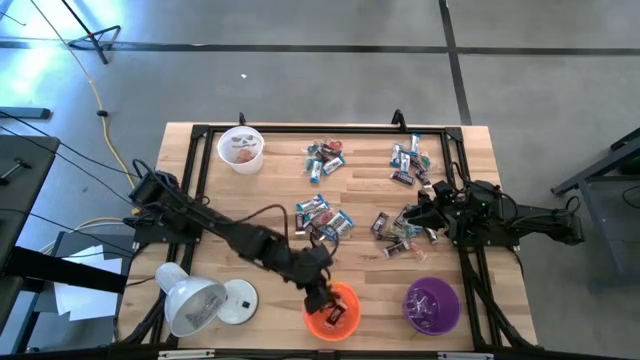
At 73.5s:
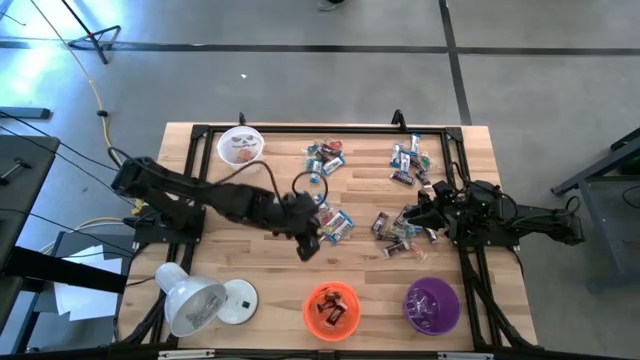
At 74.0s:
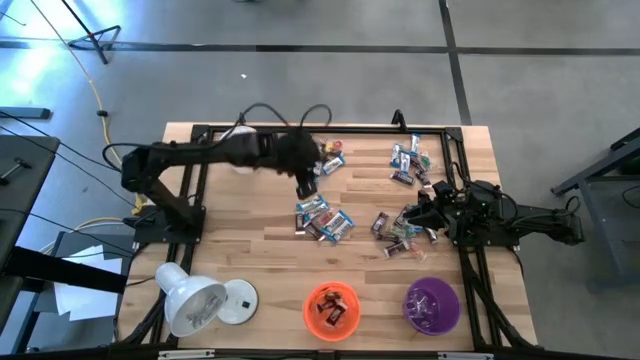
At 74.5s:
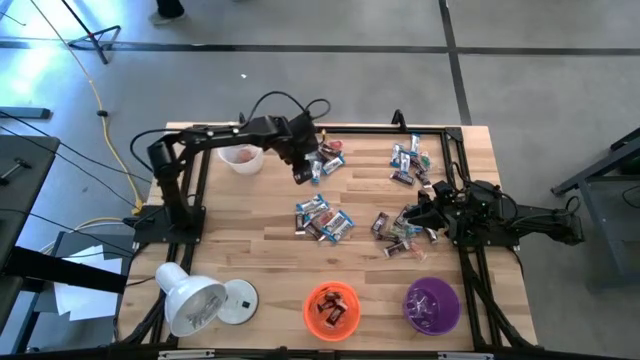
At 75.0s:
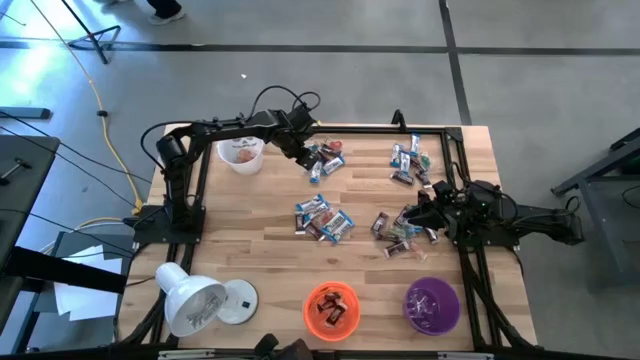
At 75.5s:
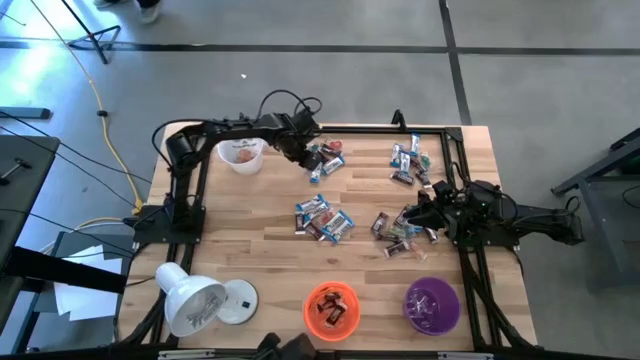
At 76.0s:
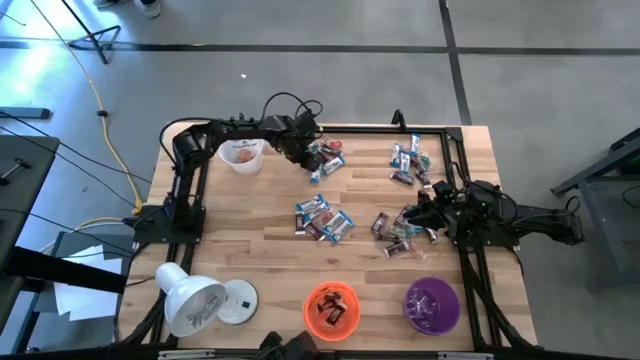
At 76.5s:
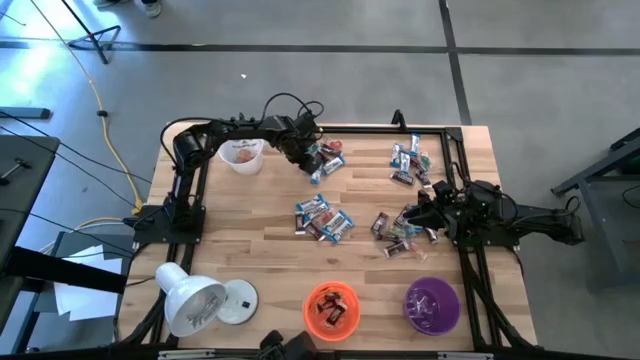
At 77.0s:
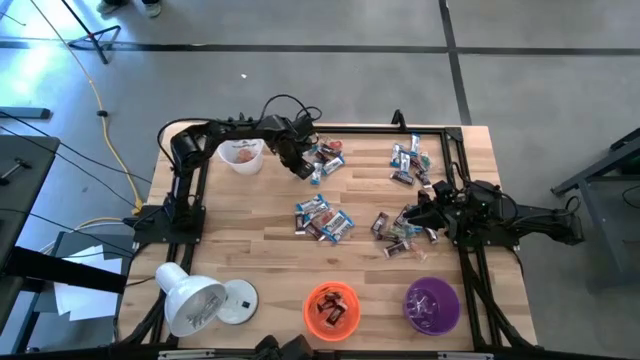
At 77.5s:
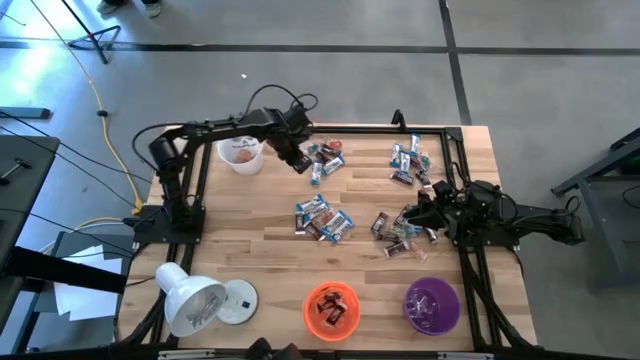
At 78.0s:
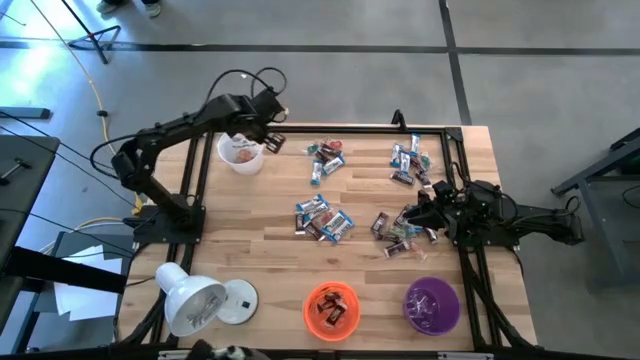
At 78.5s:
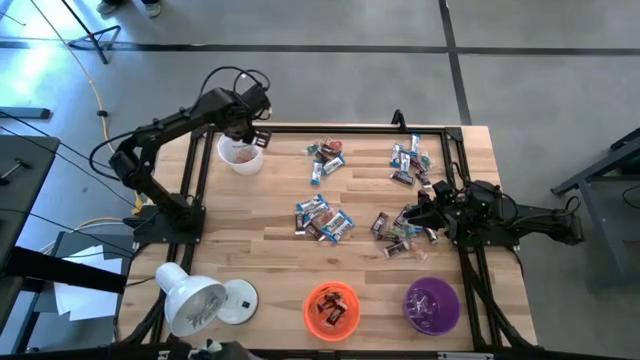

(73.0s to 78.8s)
Task: Organize candy in baskets
Put the blue gummy into the white bucket

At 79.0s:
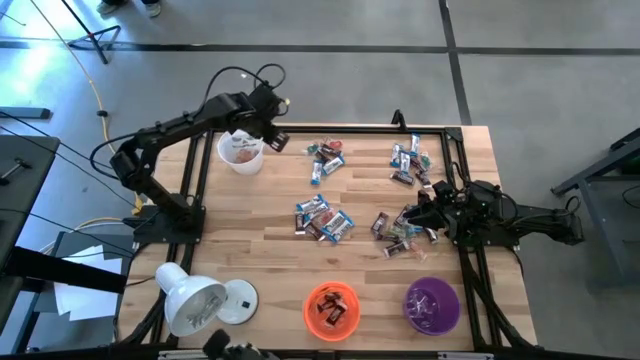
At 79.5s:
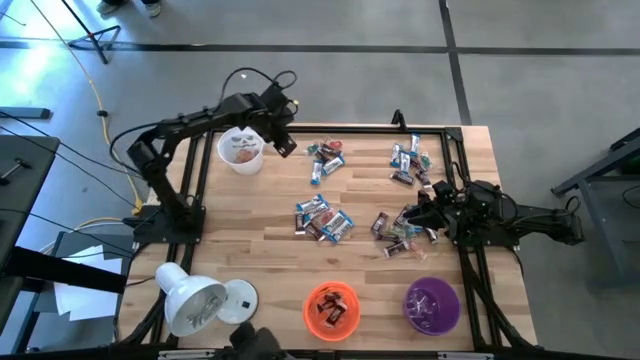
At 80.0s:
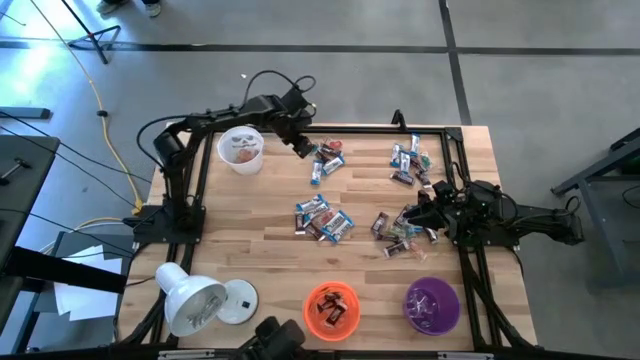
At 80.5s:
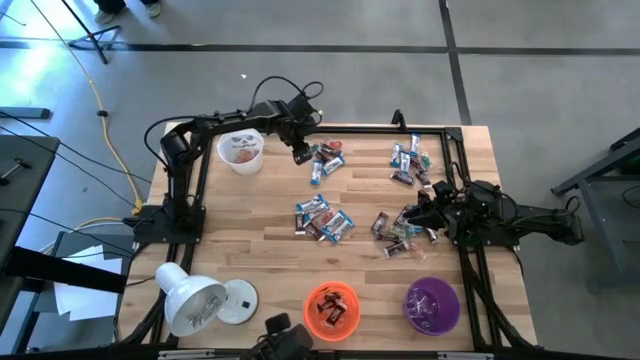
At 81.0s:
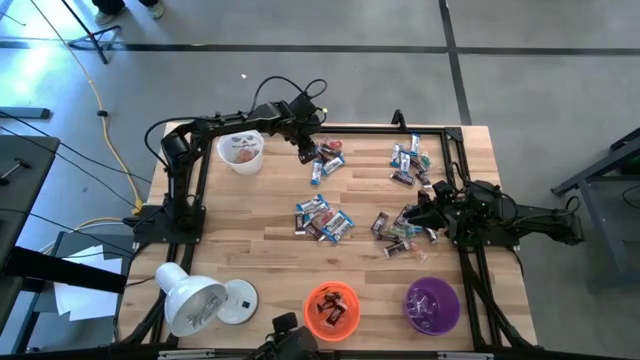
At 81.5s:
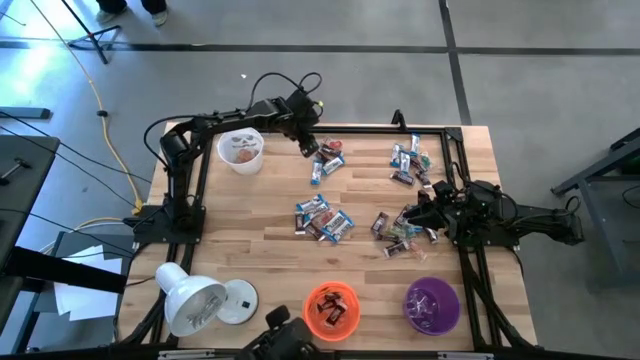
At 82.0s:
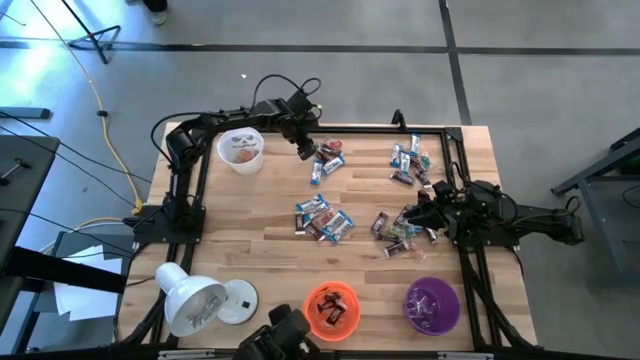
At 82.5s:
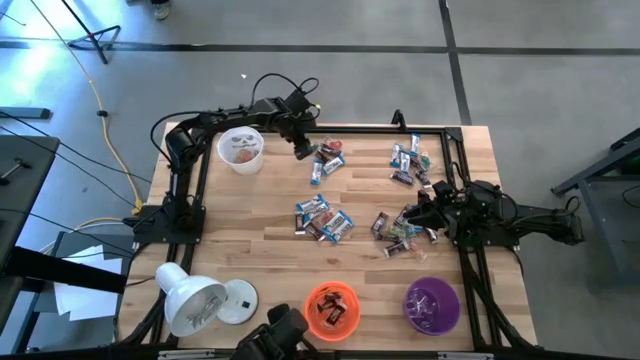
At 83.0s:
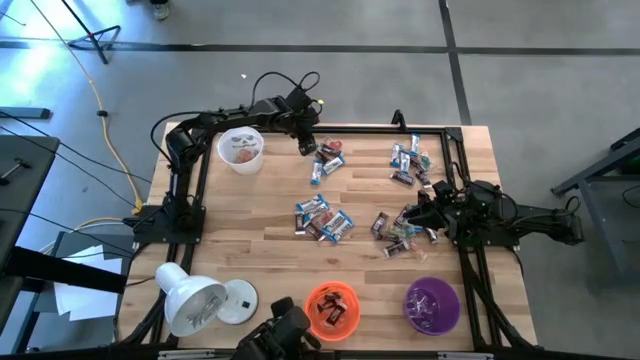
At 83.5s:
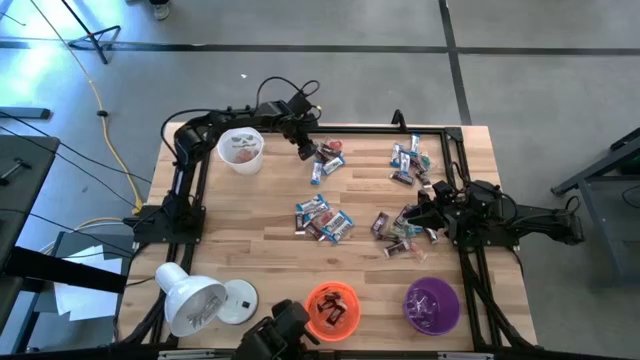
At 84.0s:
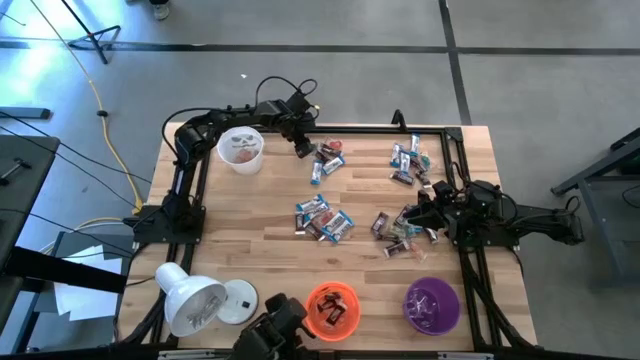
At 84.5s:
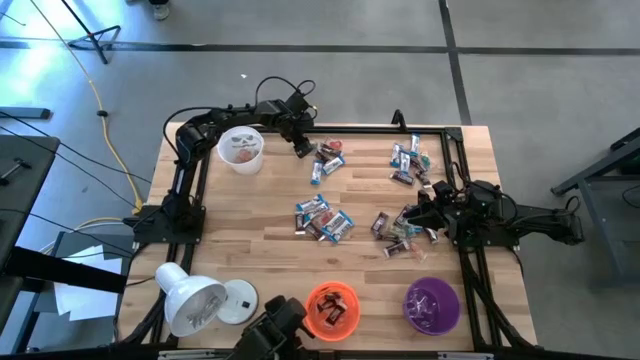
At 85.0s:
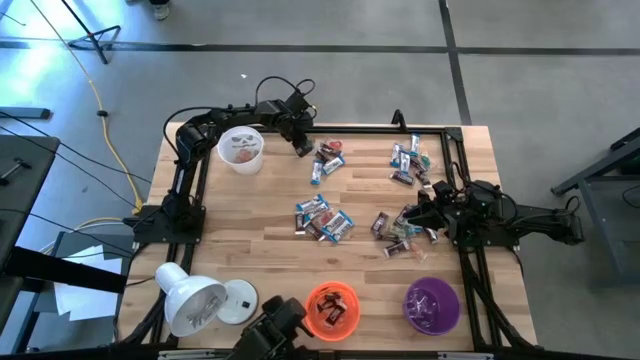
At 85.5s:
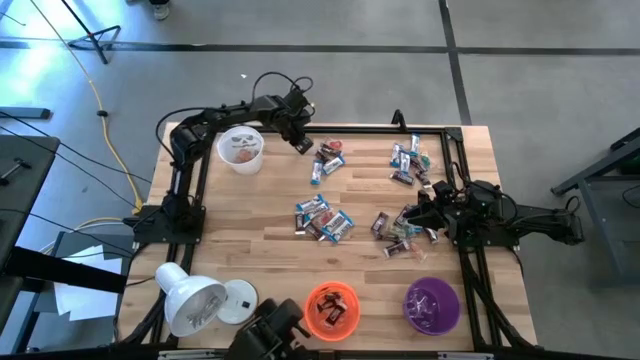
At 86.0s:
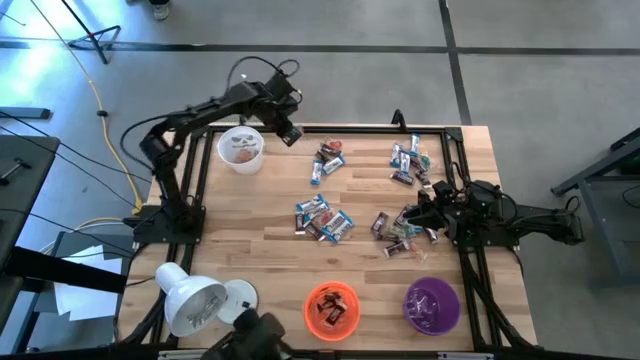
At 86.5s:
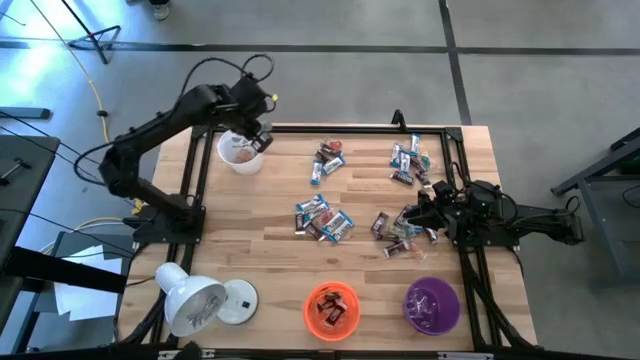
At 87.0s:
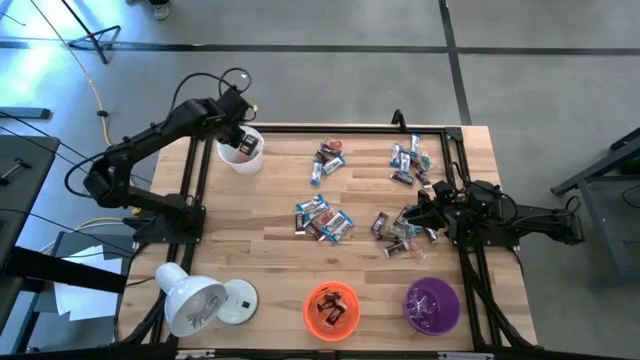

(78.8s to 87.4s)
Put the blue gummy into the white bucket

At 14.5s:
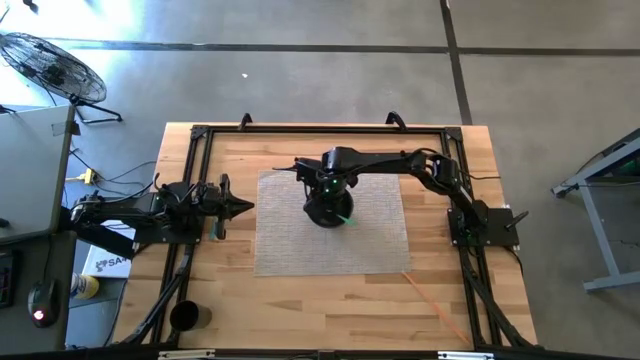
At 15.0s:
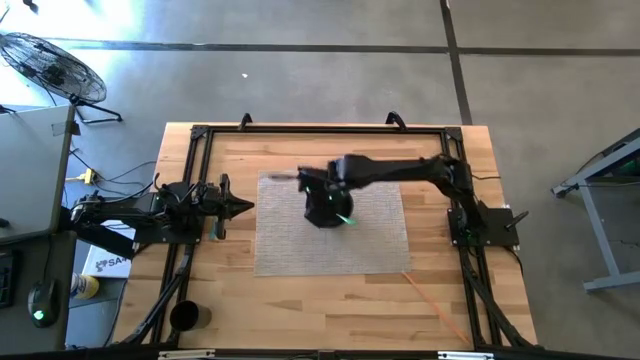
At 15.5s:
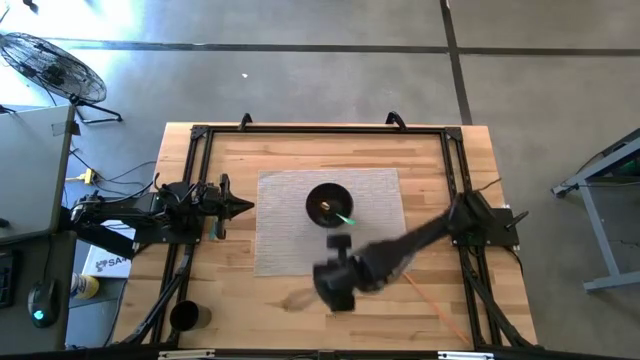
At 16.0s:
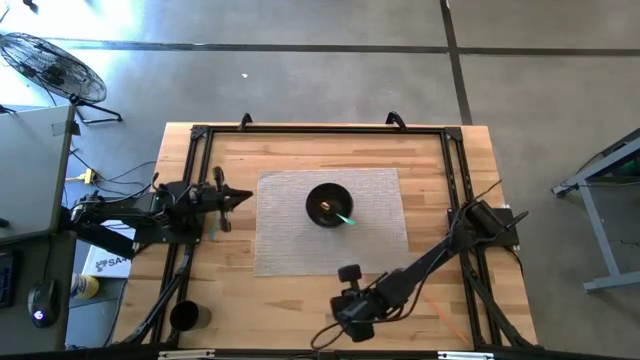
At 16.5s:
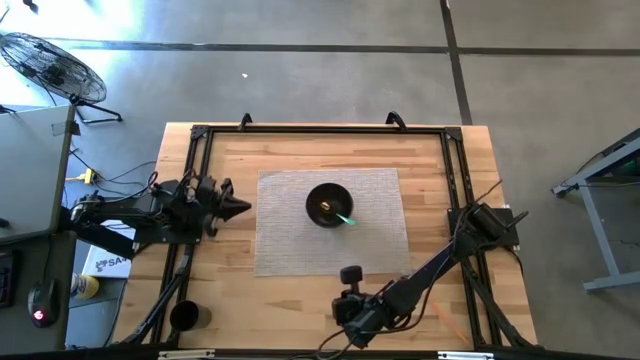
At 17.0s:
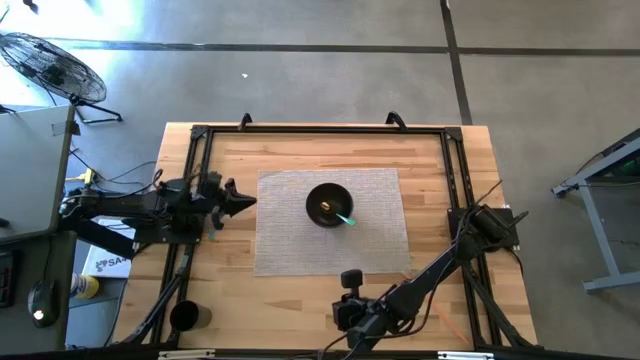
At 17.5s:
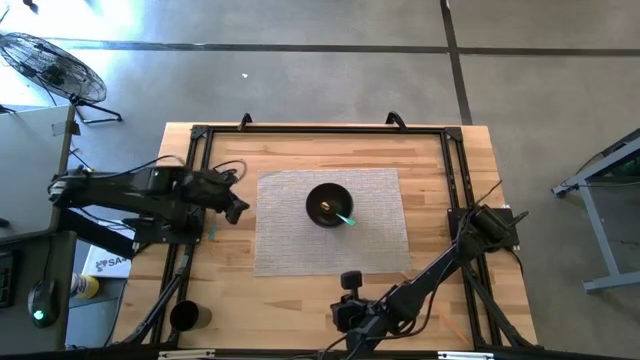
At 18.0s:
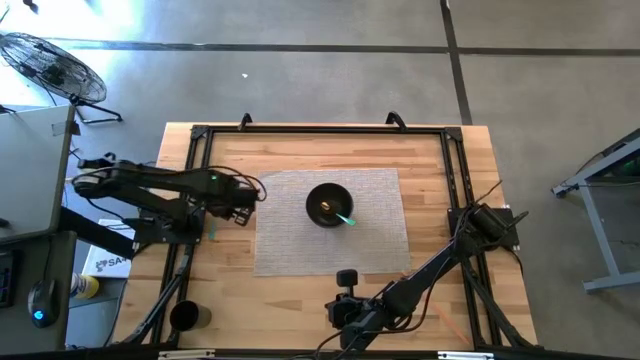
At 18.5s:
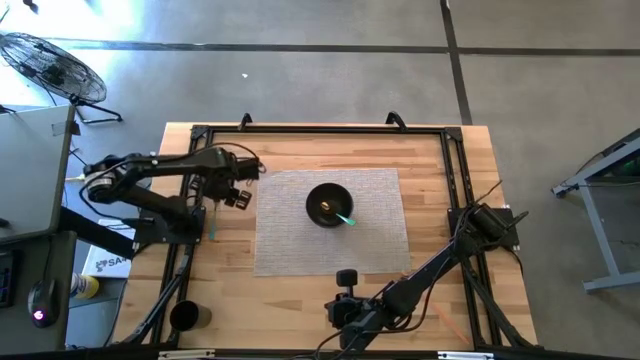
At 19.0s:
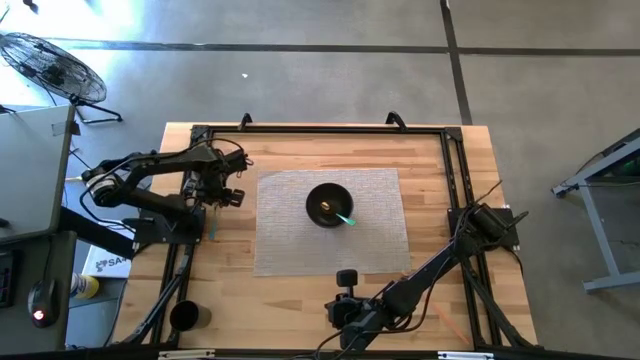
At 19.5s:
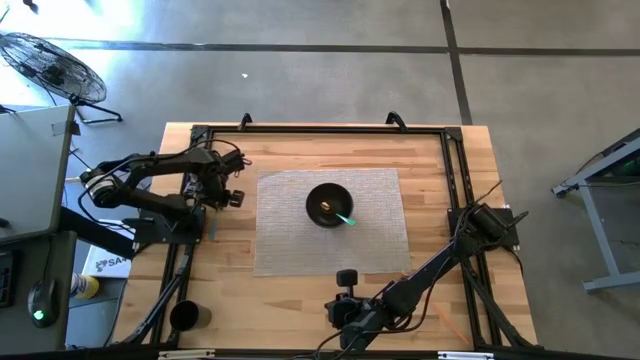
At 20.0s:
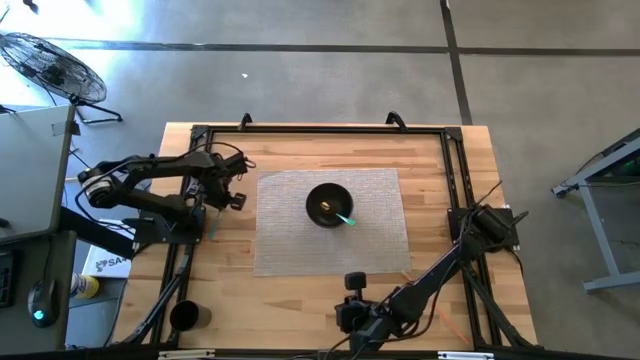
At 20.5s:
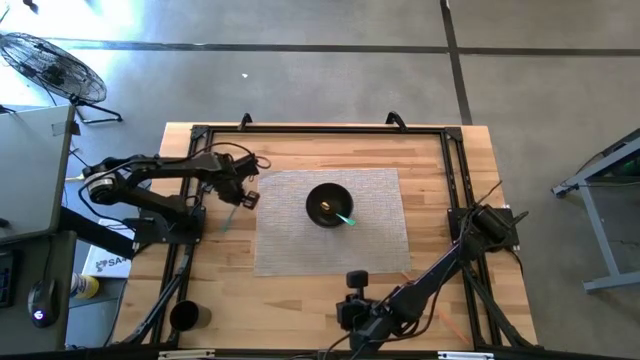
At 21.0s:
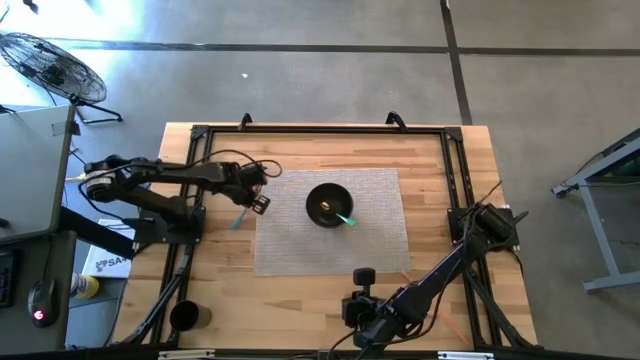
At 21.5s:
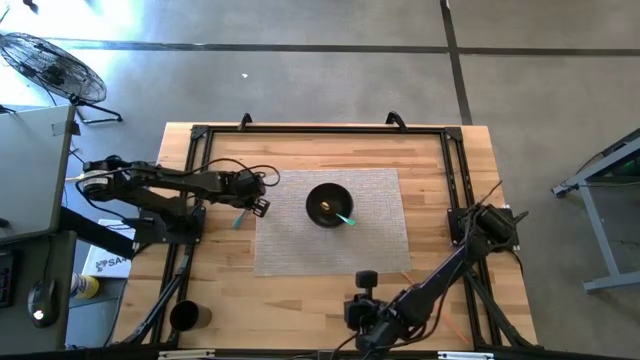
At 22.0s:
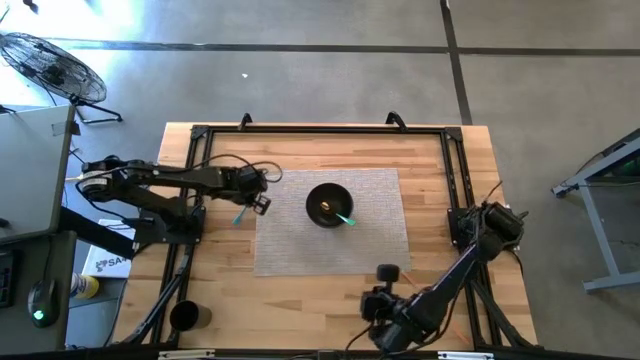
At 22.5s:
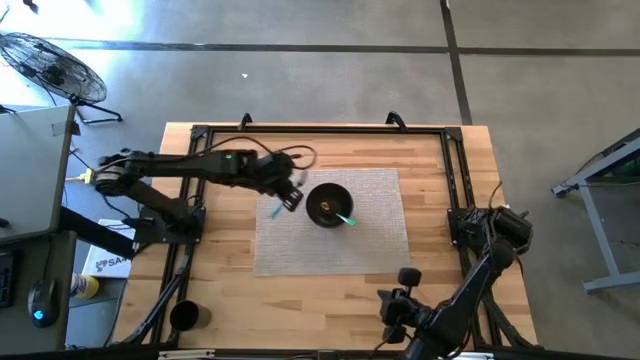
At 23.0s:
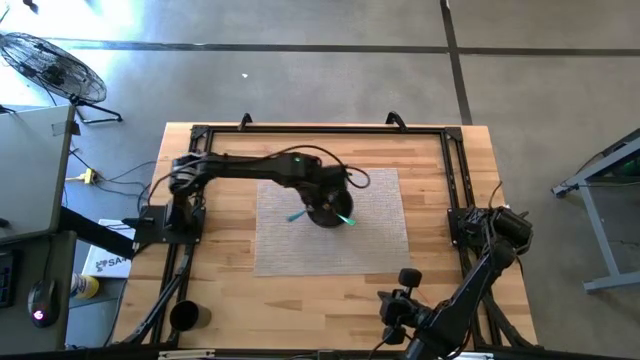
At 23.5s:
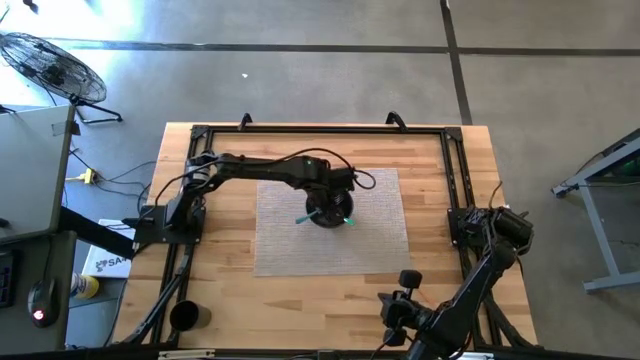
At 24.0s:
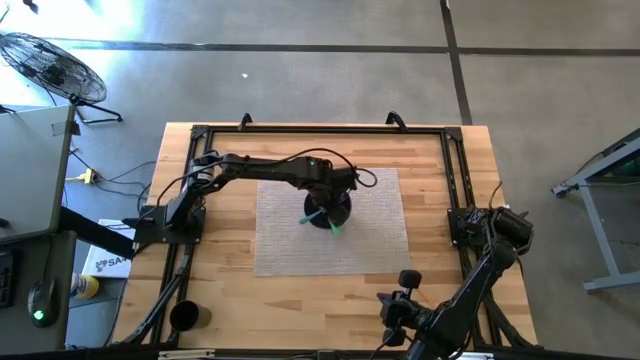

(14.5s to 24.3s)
Task: Pick & Place Utensil
Put the silver fork into the black bowl
